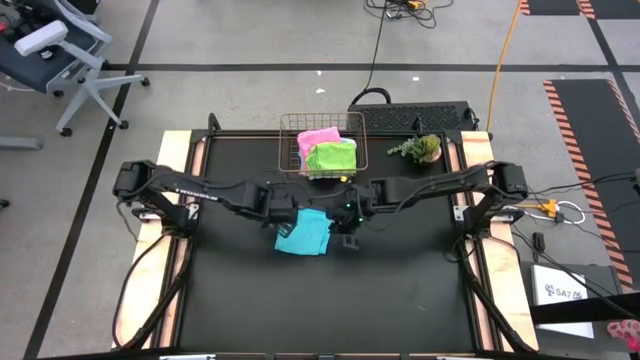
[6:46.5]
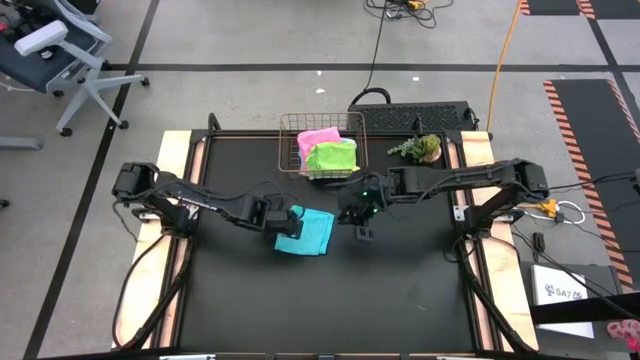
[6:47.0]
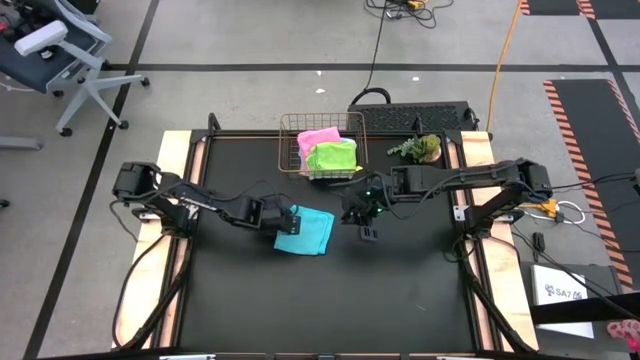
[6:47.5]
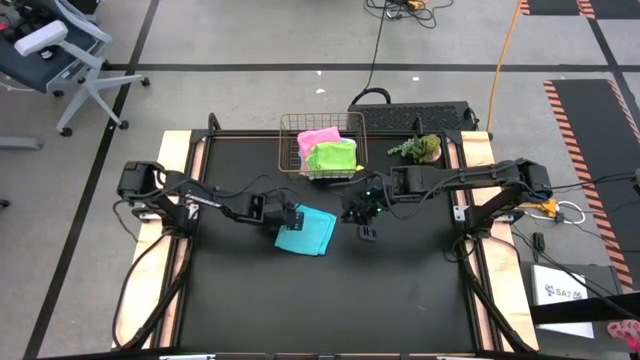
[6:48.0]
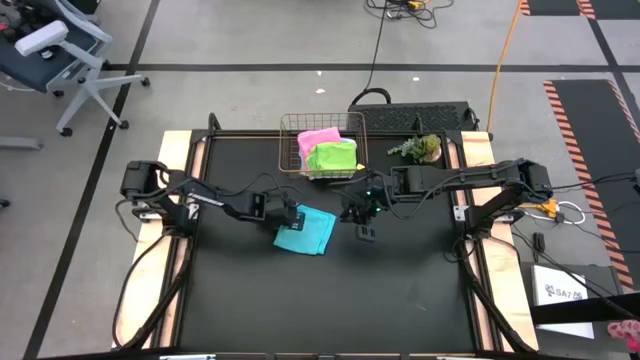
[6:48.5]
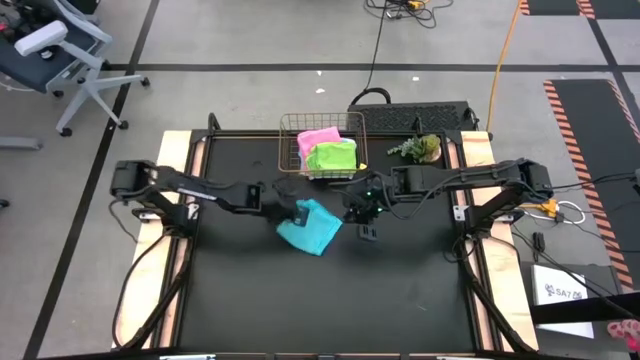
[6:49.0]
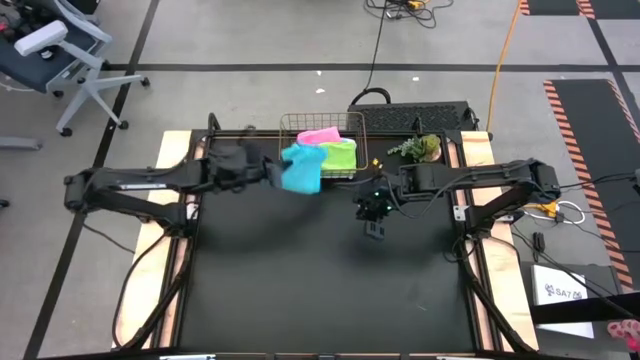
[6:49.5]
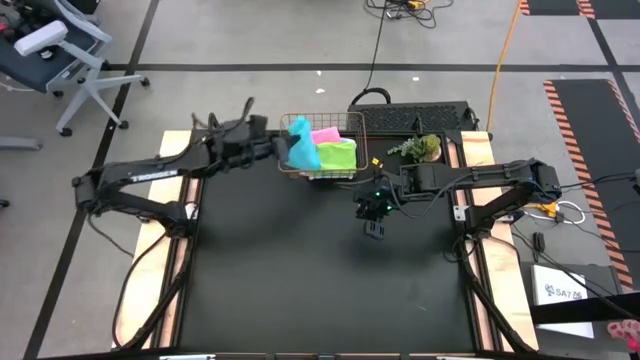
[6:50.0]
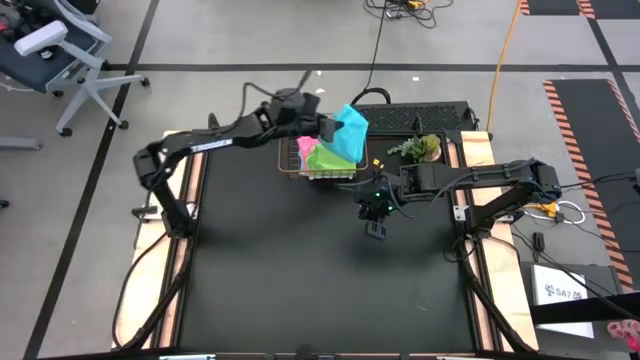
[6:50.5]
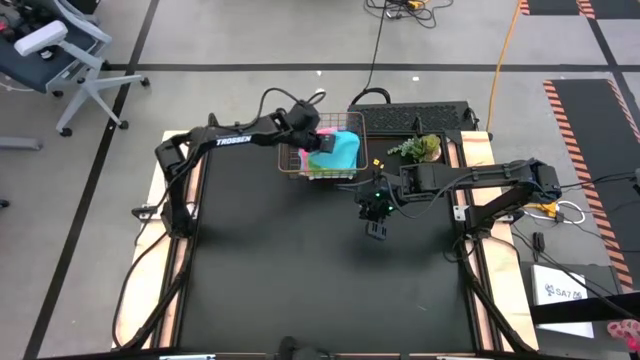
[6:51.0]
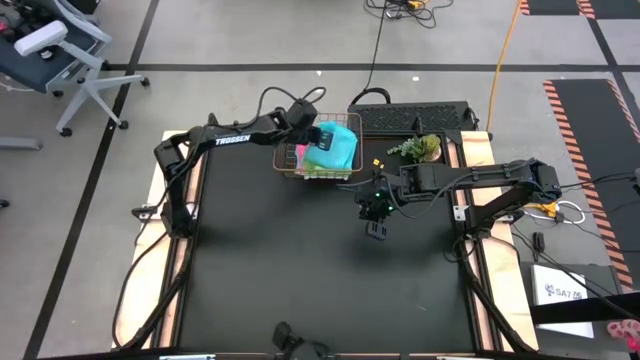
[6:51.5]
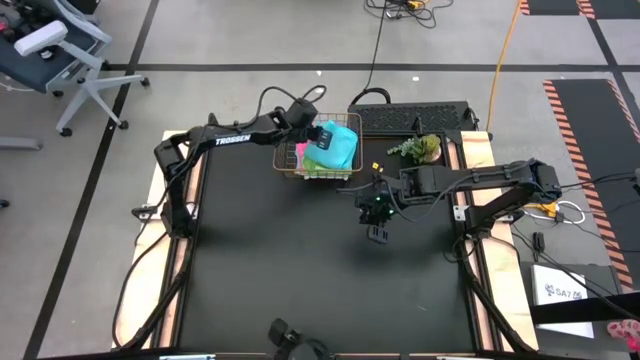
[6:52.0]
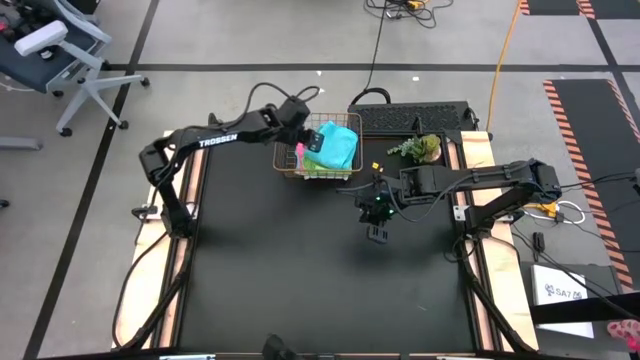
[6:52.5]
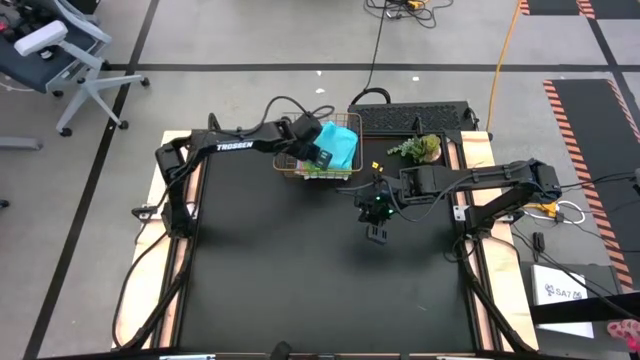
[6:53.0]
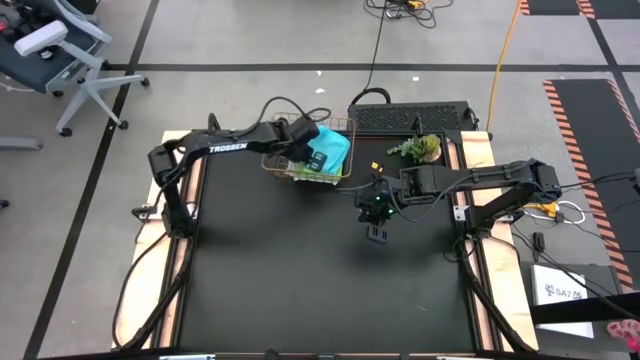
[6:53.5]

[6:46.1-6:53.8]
Task: Fold microfiber towels
Put the blue microfiber cloth into the wire basket

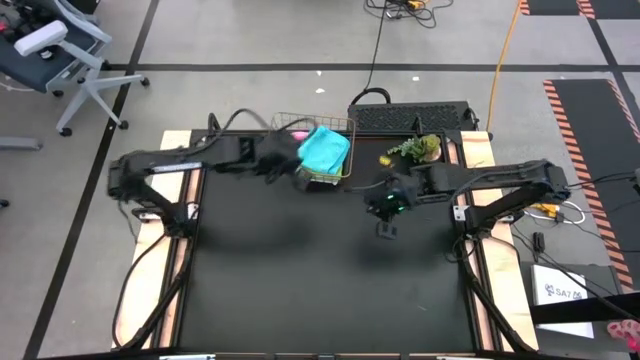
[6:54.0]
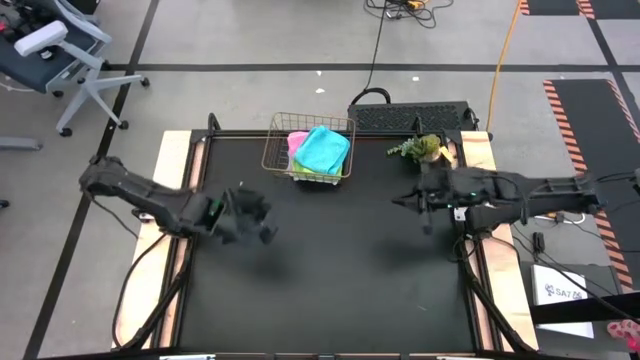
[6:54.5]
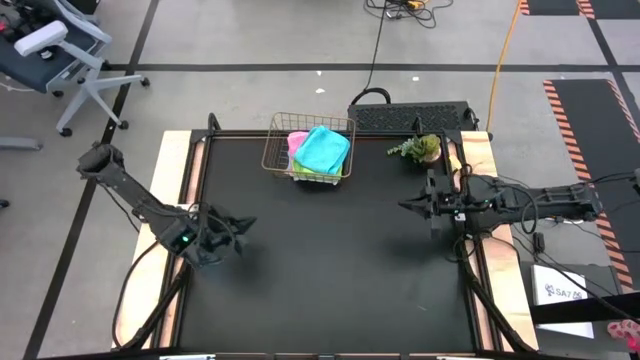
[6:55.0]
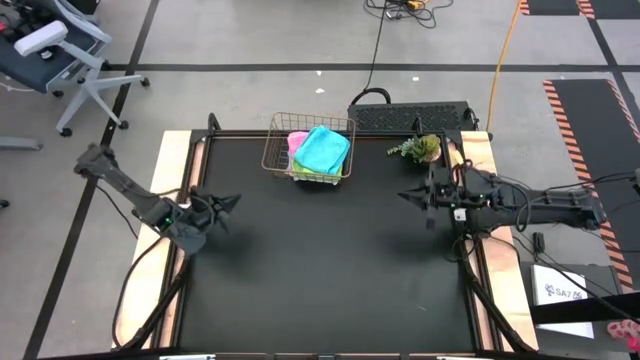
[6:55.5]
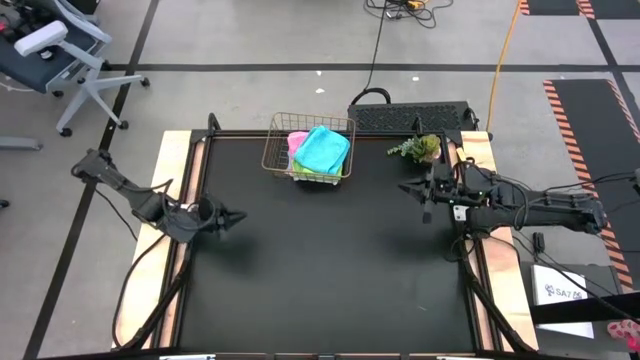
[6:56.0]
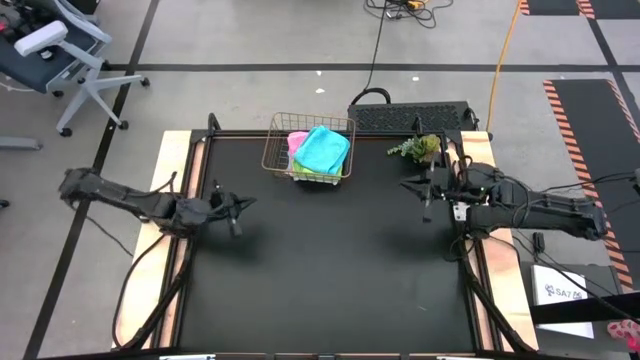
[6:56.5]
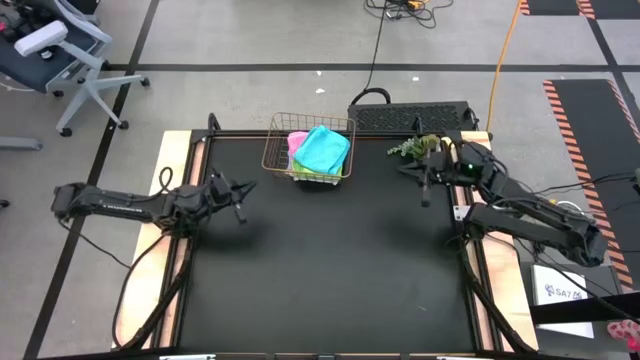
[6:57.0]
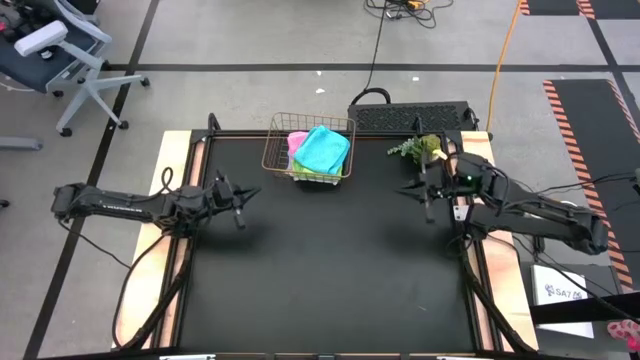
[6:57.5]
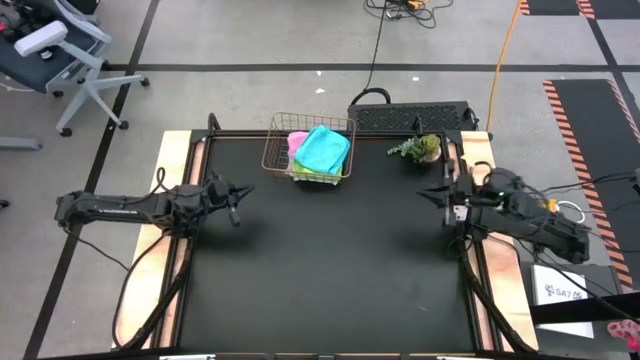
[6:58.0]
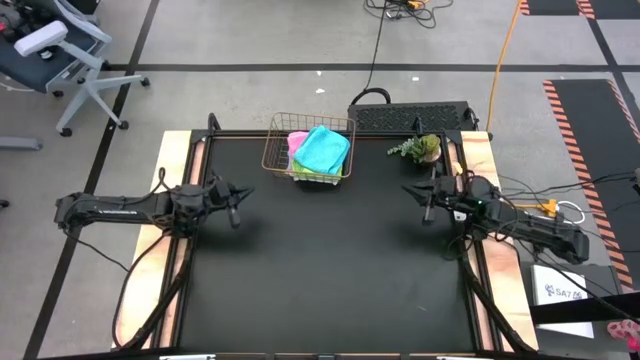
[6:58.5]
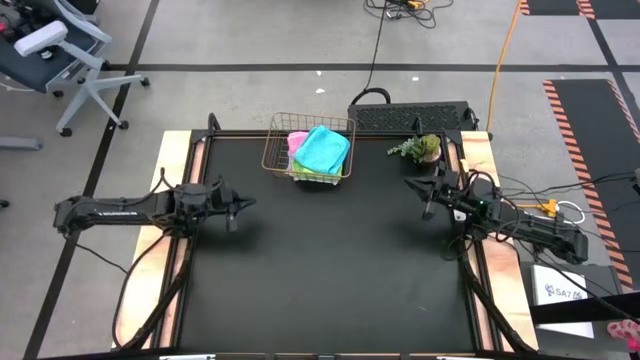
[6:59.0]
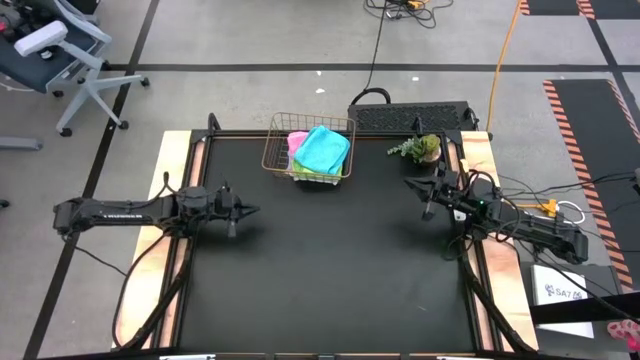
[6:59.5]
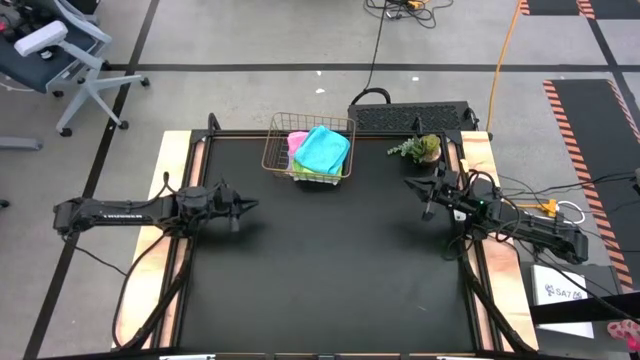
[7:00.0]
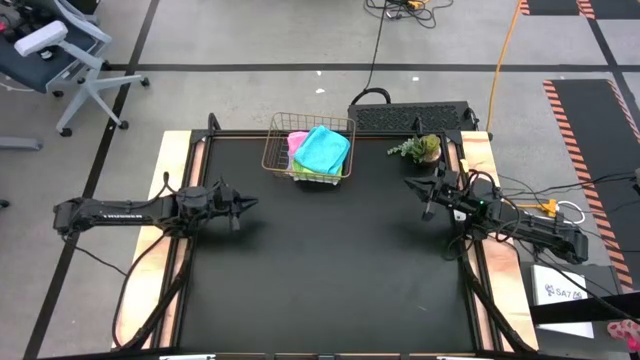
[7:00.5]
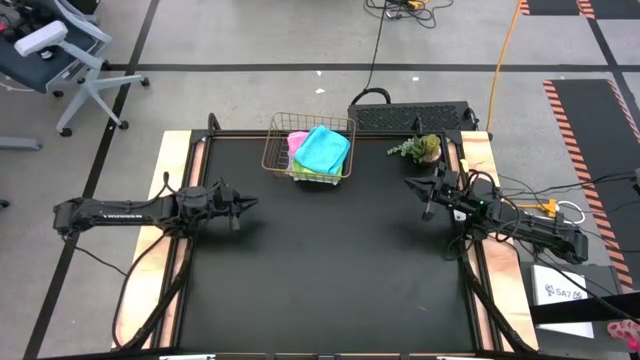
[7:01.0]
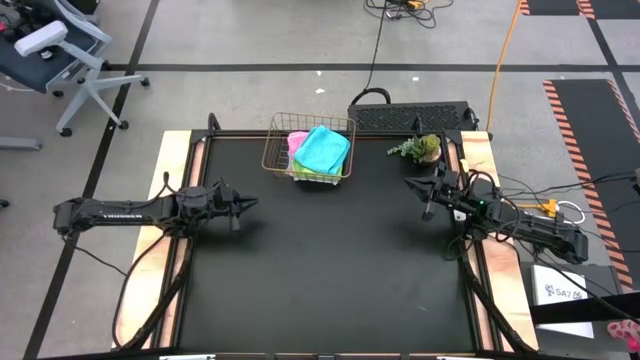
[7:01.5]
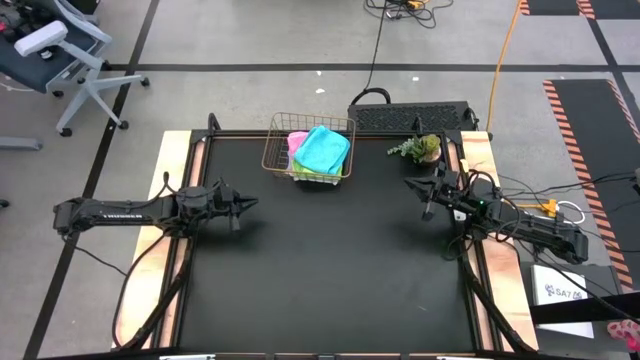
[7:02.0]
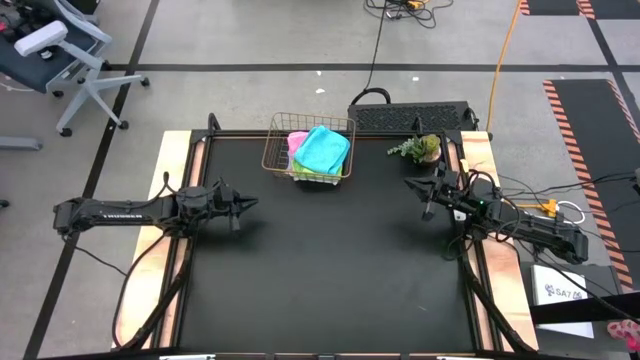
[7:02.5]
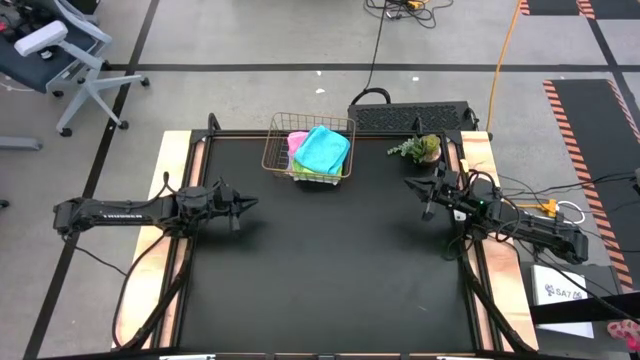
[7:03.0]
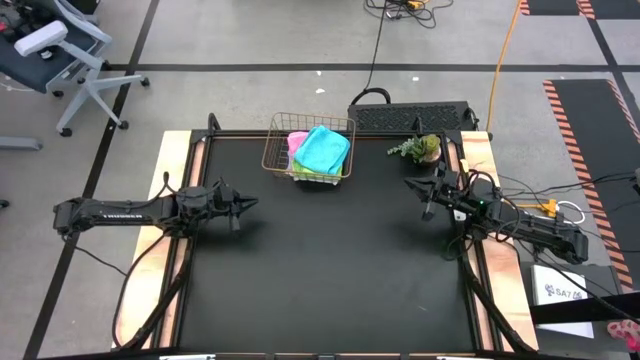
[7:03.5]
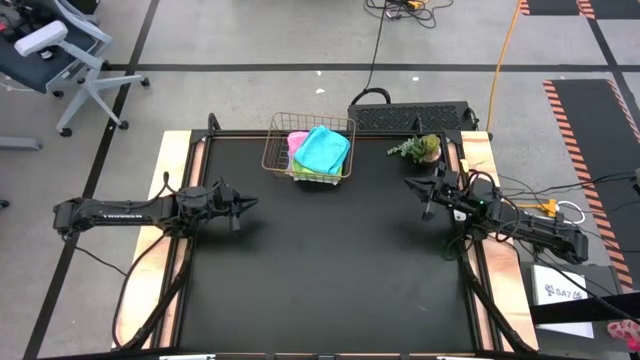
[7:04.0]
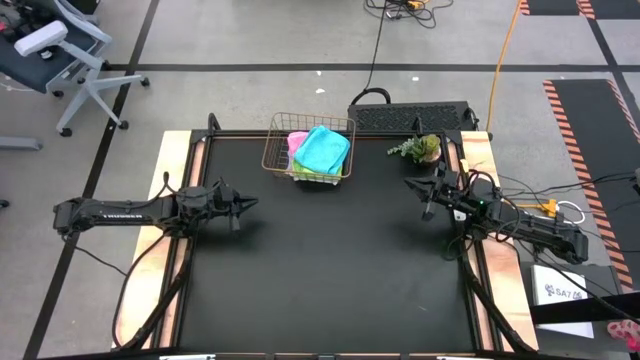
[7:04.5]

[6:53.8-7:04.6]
Return to Home Position

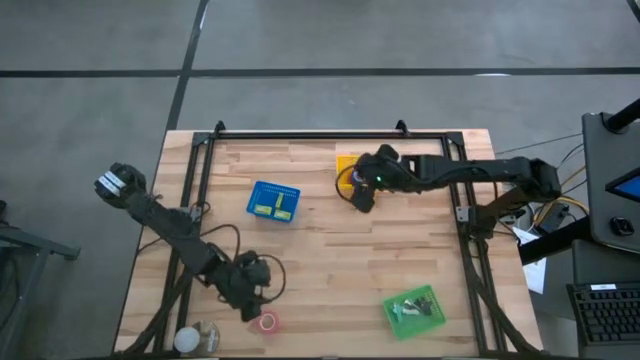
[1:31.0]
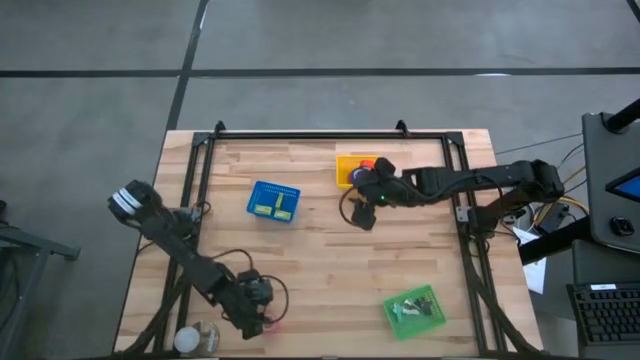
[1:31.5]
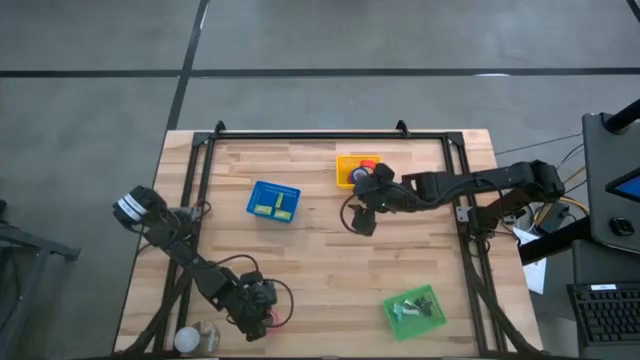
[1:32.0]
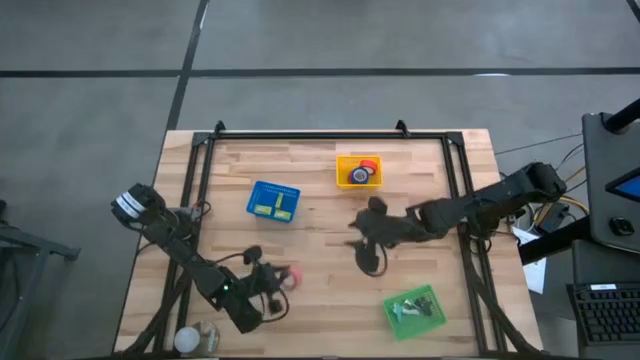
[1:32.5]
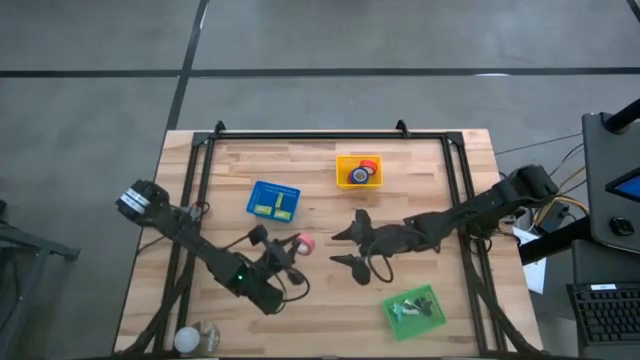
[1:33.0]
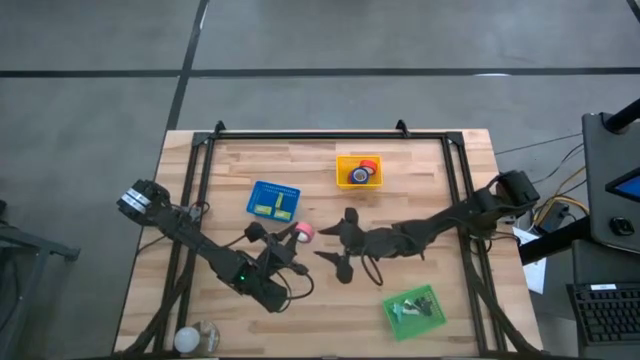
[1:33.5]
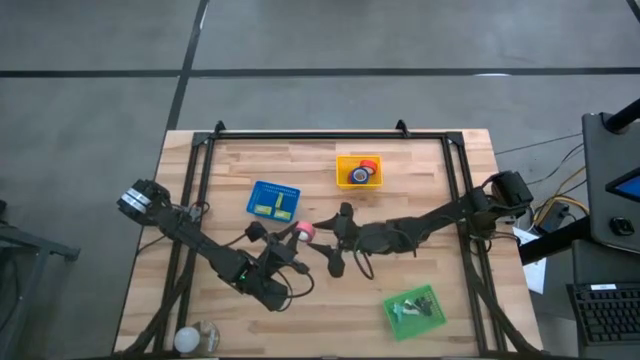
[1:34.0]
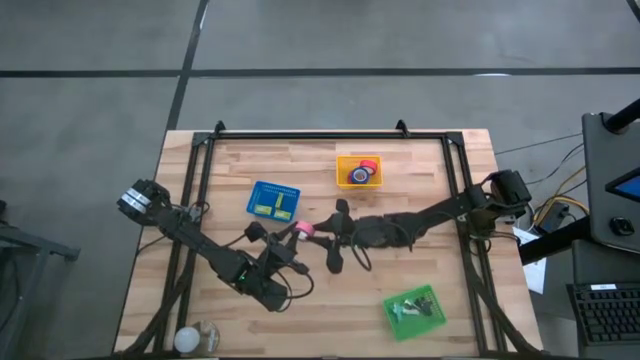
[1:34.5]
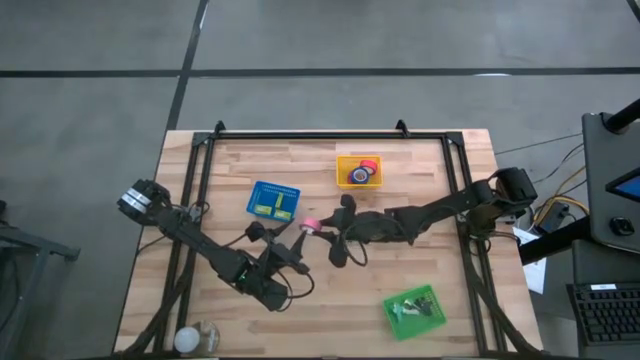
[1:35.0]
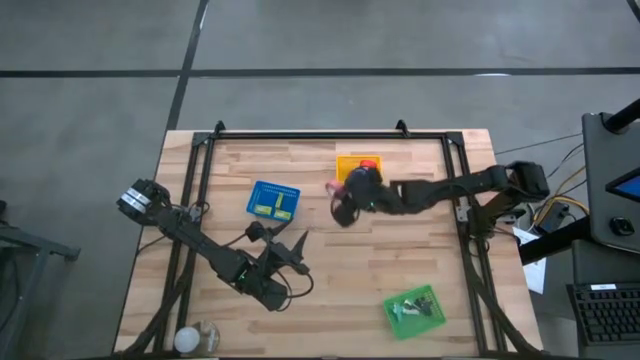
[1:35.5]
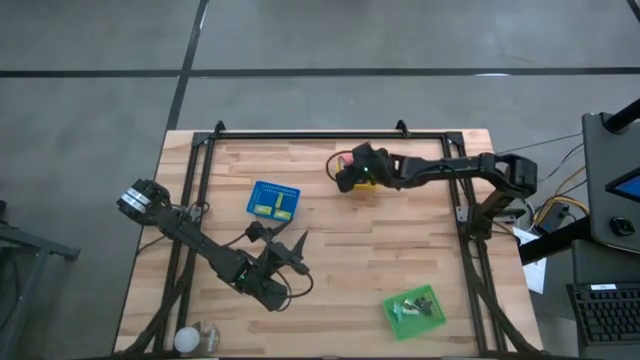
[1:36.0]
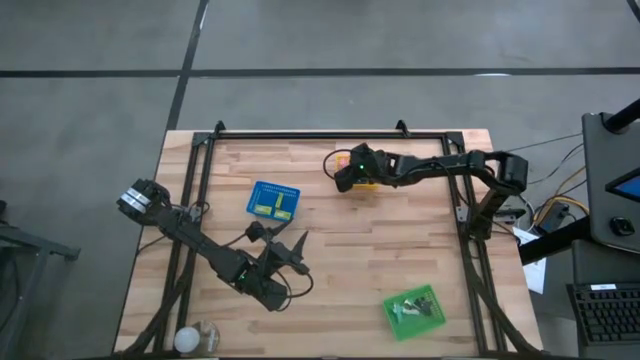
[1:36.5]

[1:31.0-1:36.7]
Task: Pick and place Stapler, Stapler remover, tape
Put the pink tape into the yellow bin
